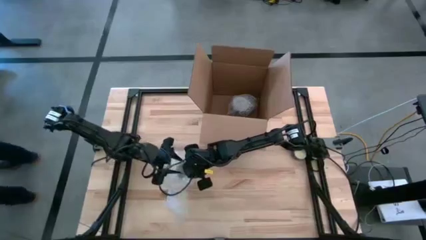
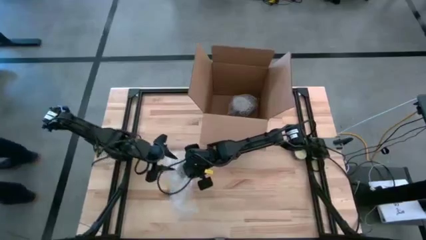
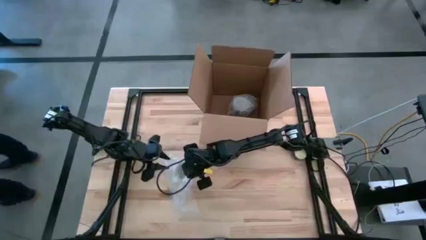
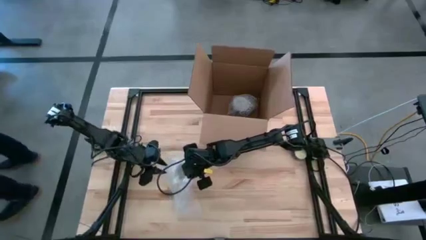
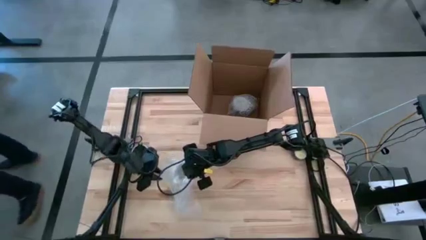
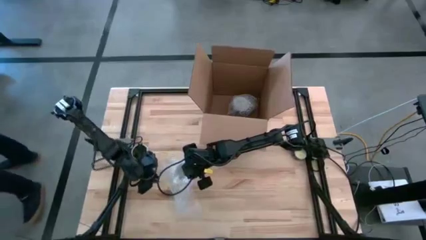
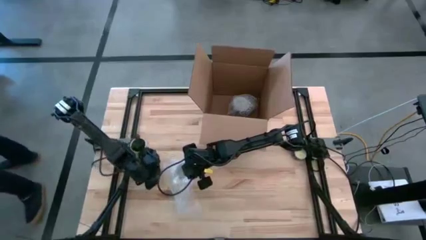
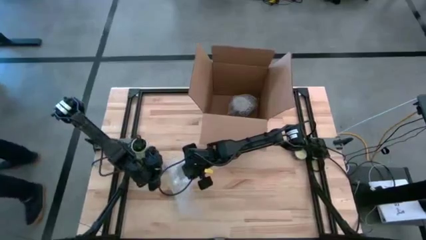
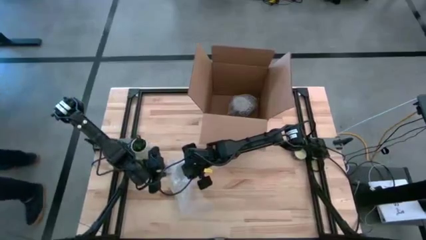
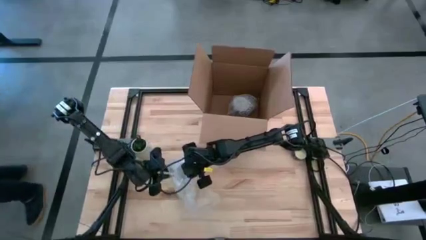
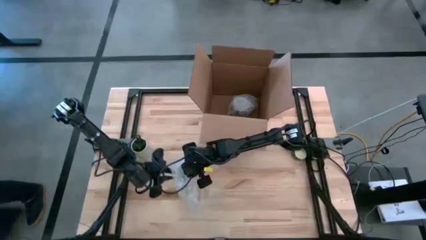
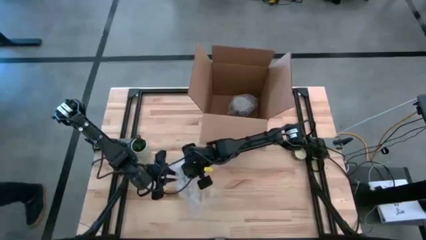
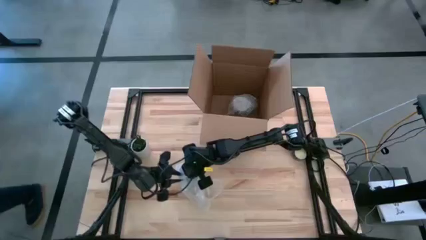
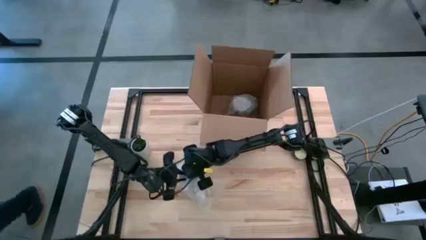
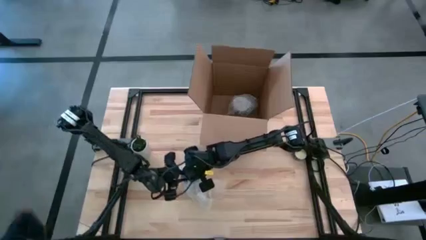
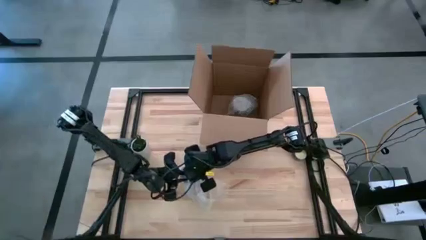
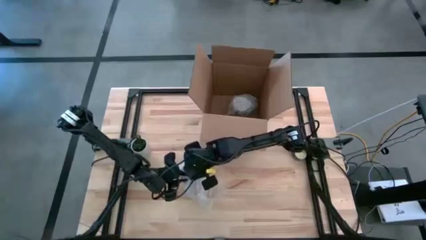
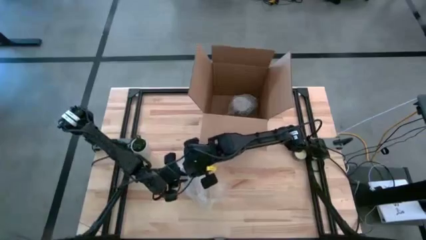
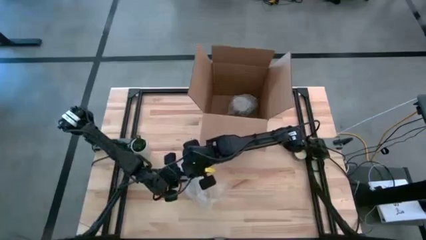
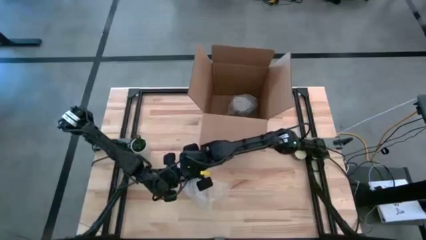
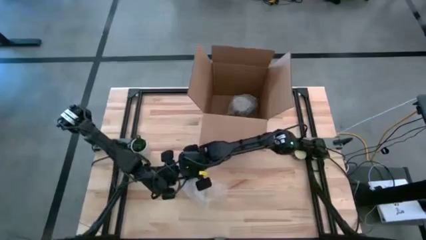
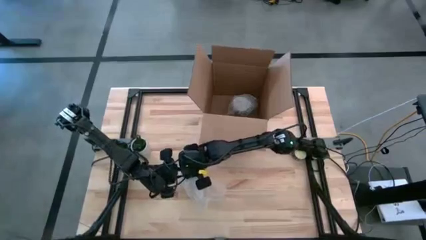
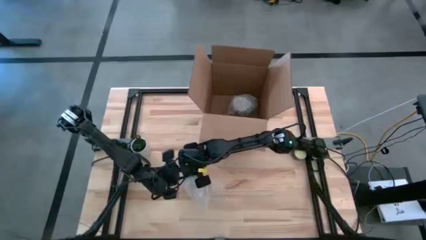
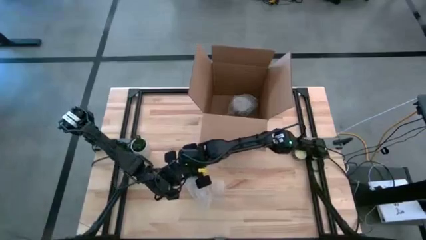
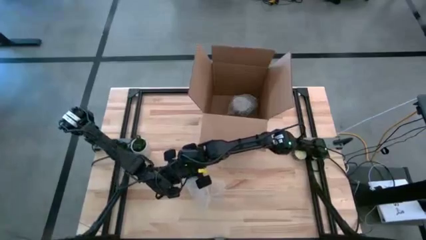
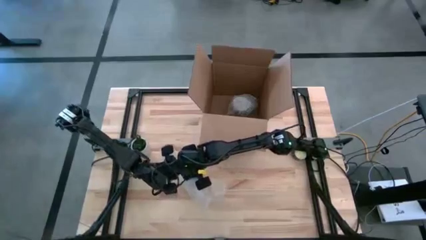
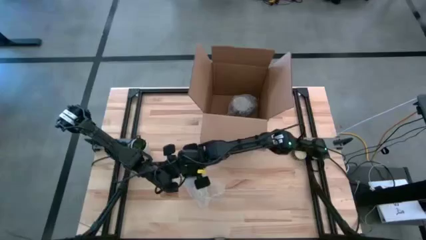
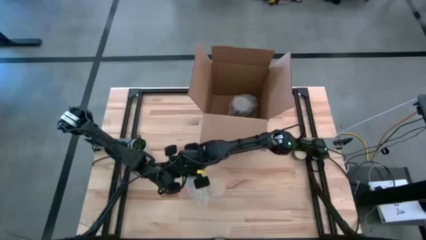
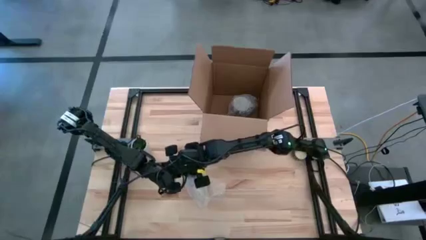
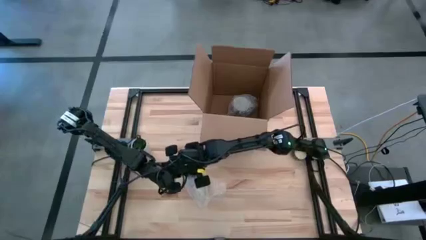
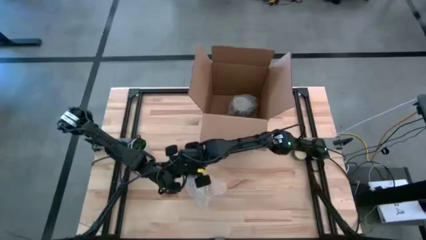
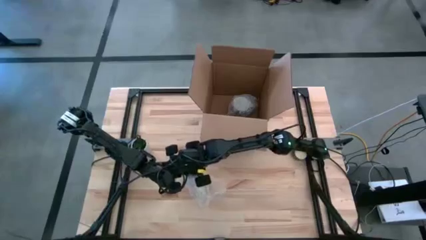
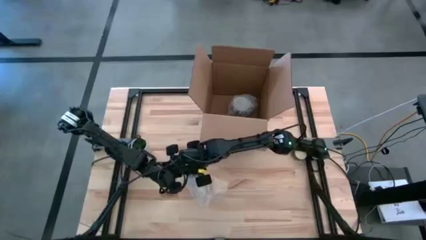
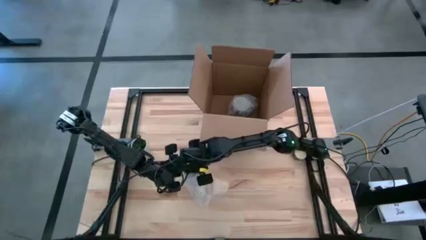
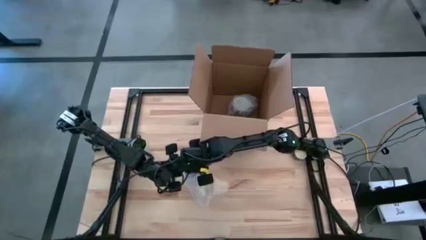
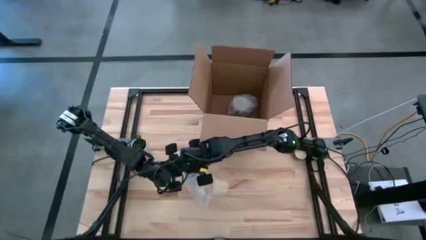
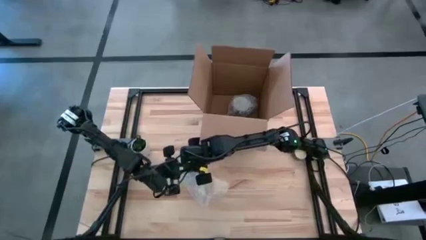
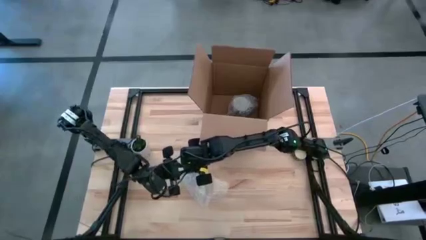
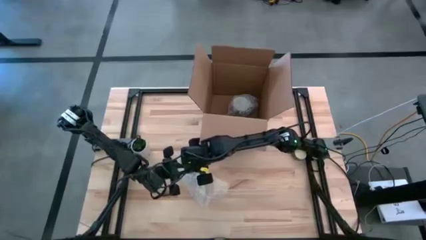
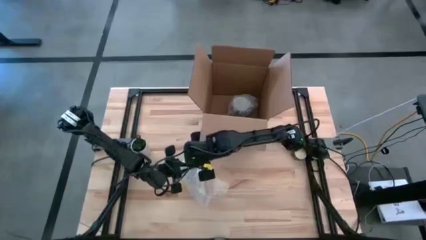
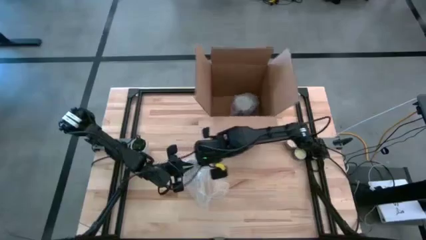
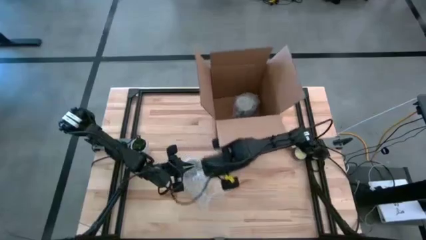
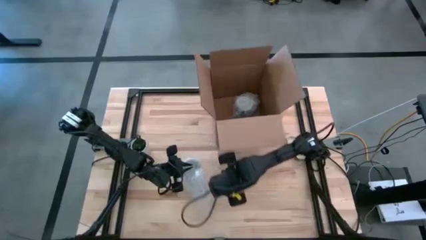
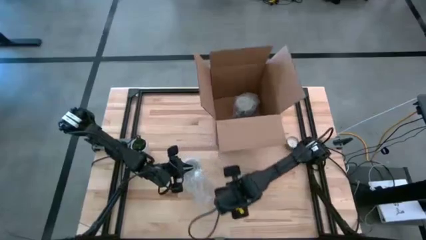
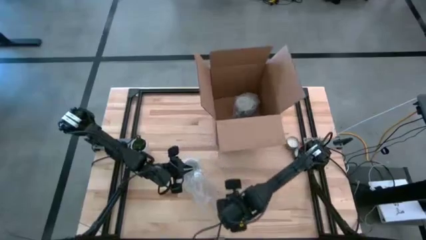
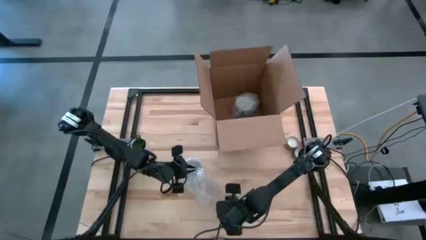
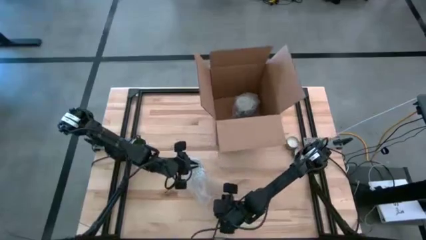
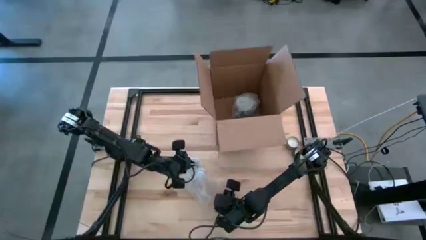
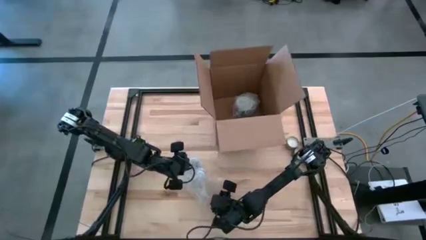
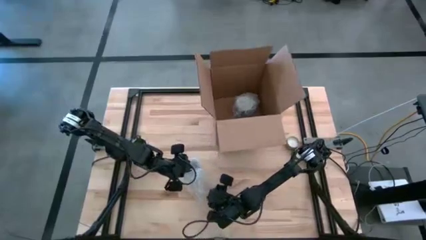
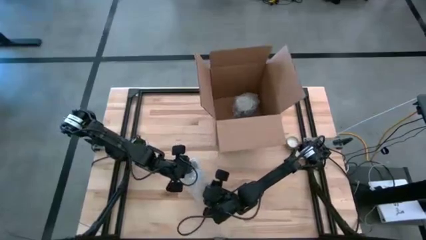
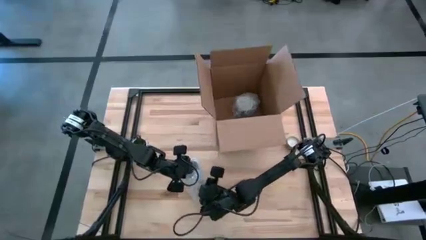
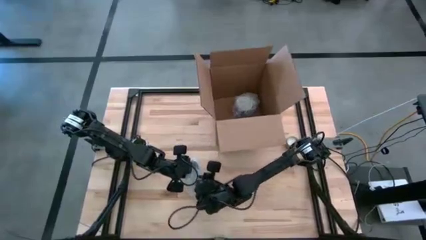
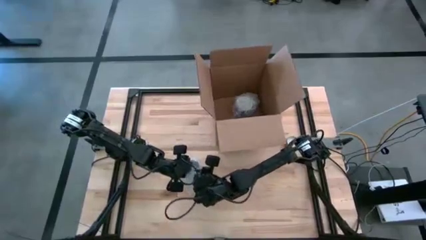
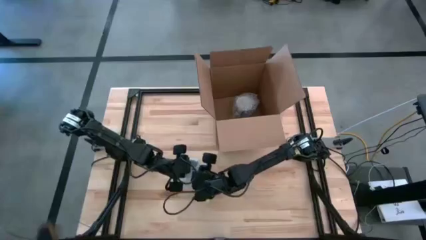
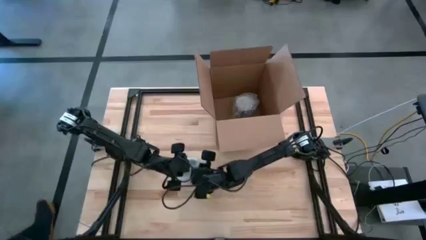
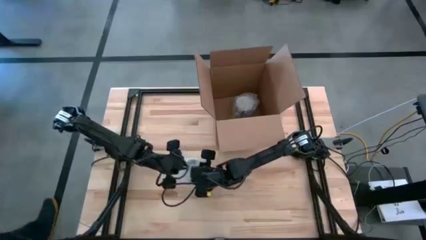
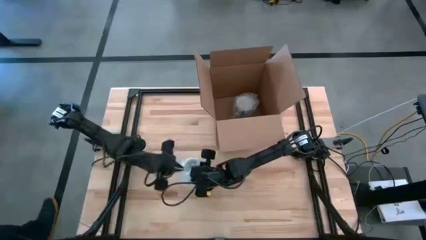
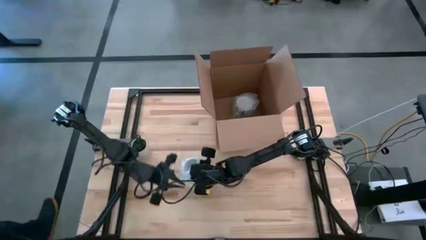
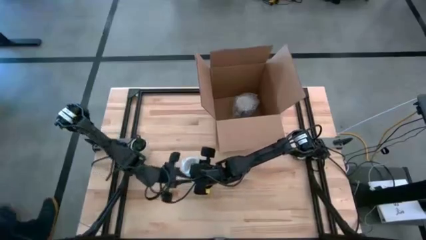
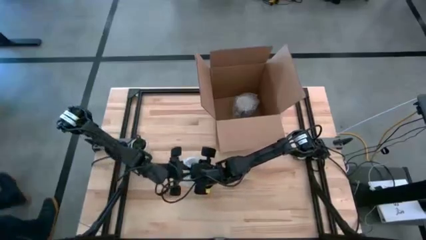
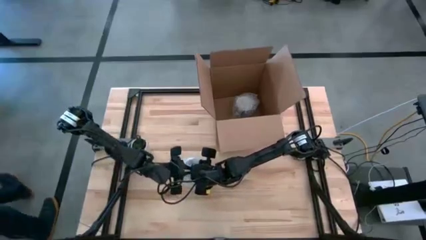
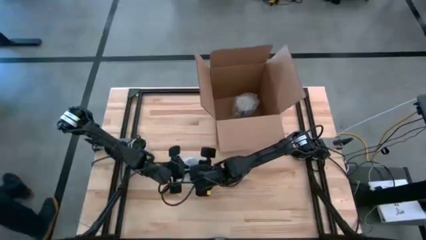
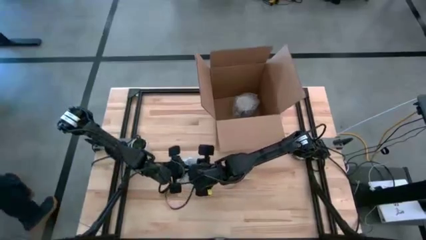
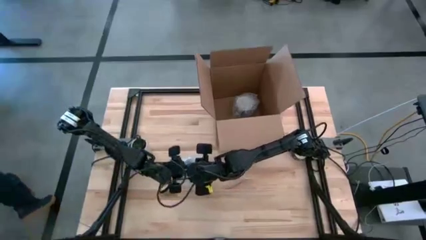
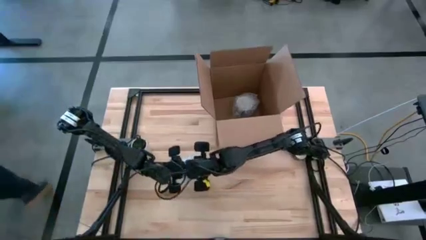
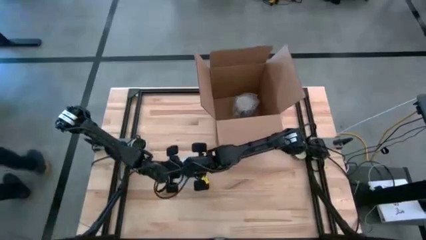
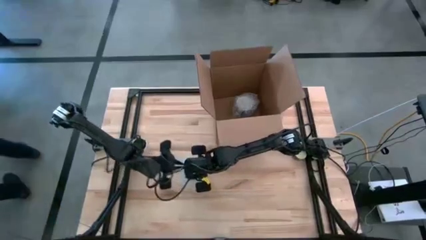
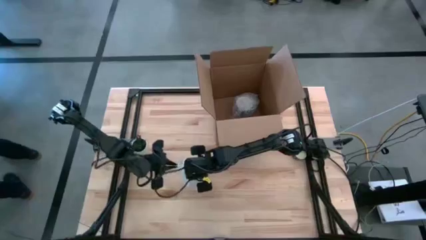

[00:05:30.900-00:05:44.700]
Task: wrap mug
Wrap the blue patterned mug with the bubble wrap

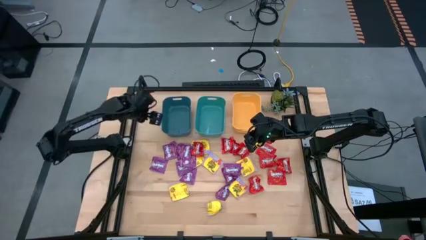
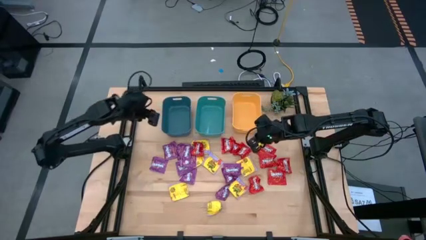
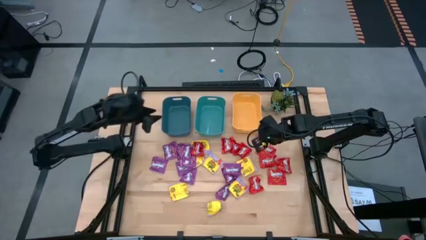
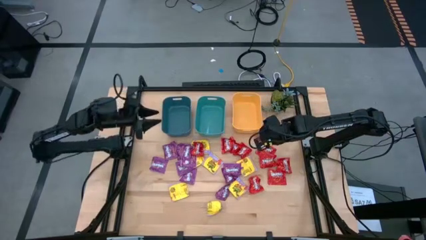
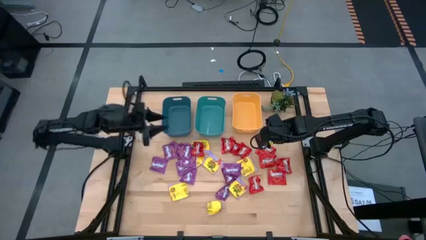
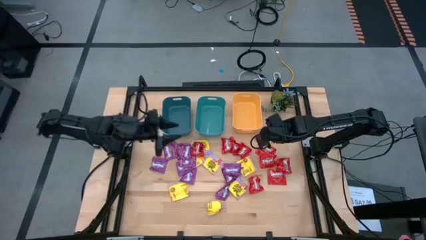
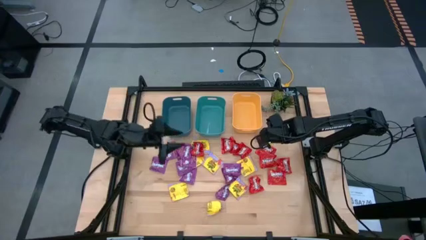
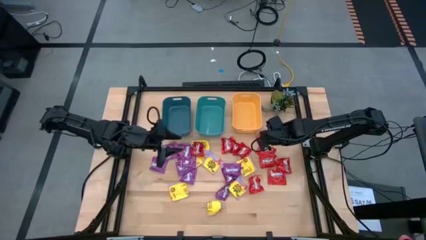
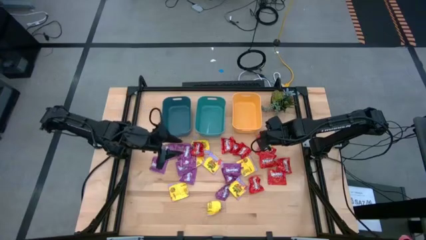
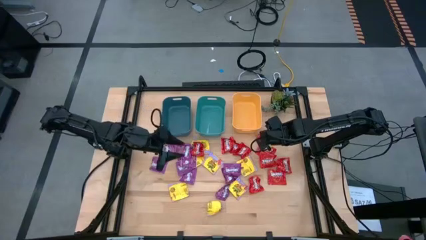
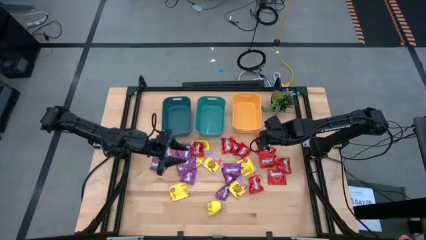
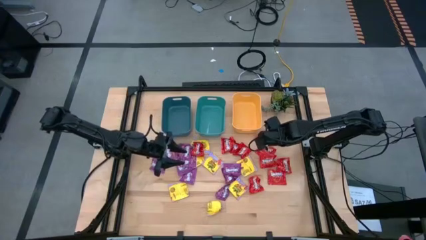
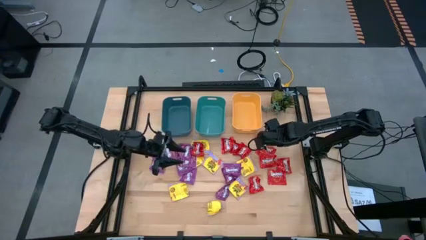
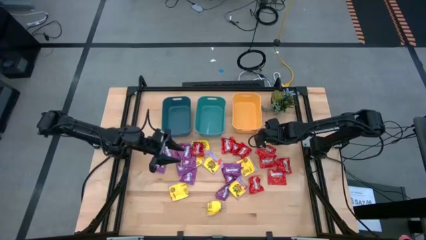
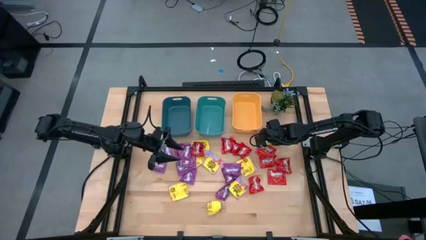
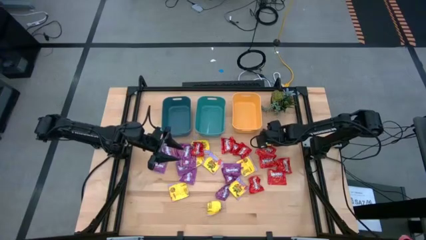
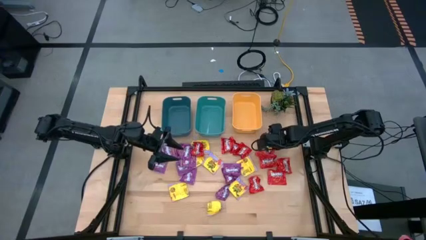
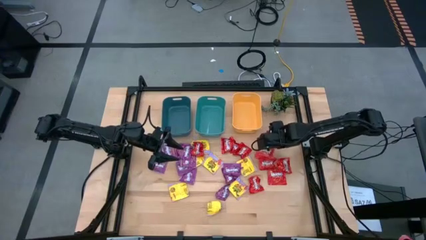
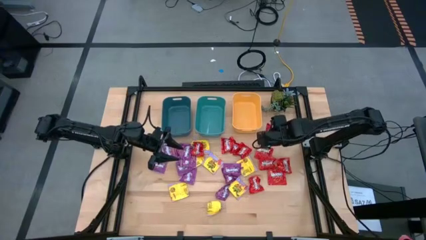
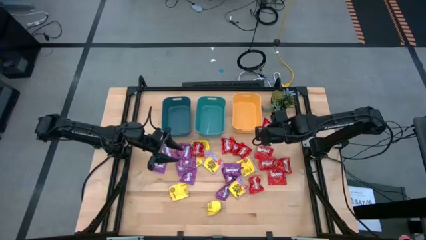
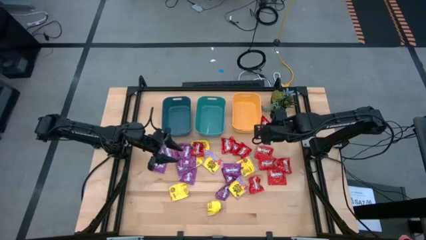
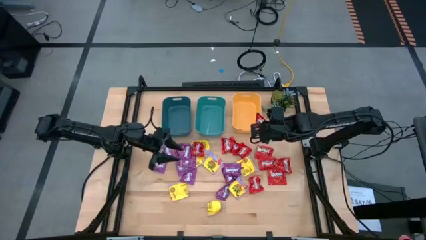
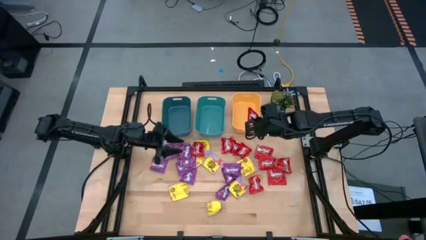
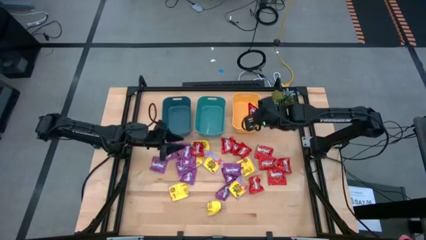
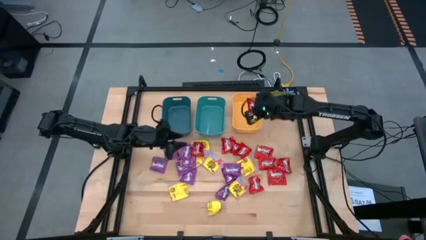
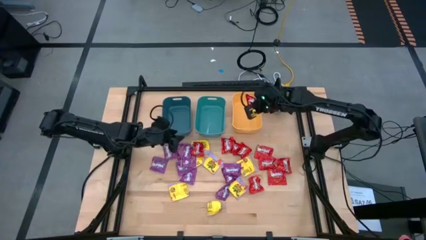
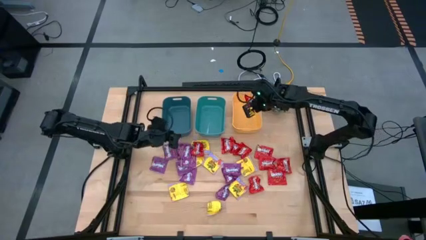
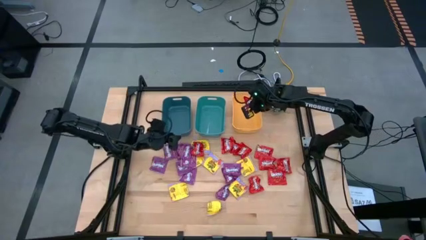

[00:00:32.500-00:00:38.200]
Task: Sort candy
Put the red candy into the yellow bin
